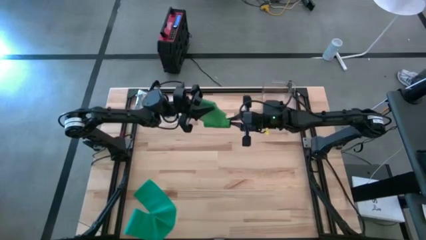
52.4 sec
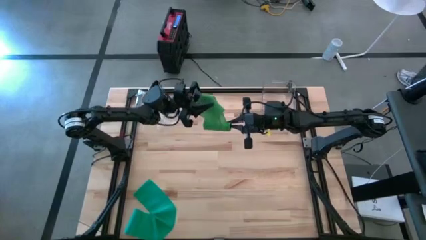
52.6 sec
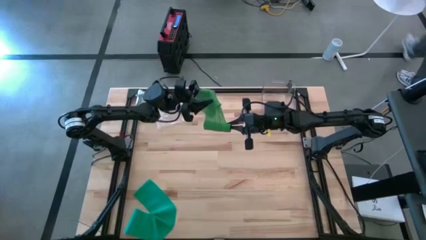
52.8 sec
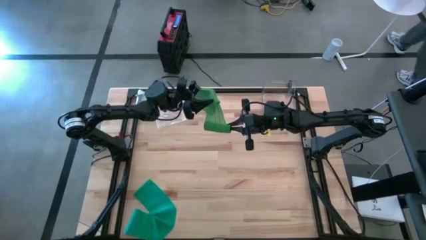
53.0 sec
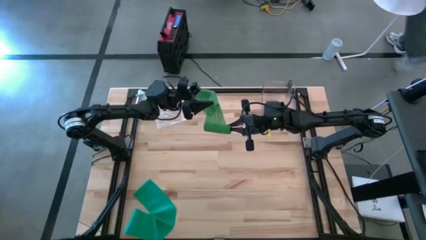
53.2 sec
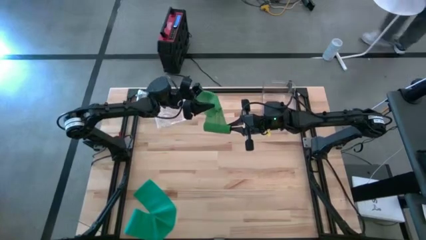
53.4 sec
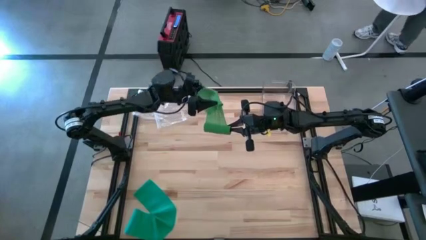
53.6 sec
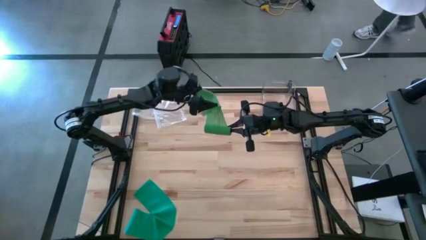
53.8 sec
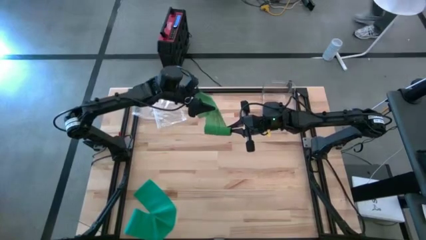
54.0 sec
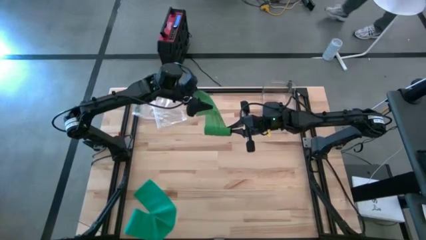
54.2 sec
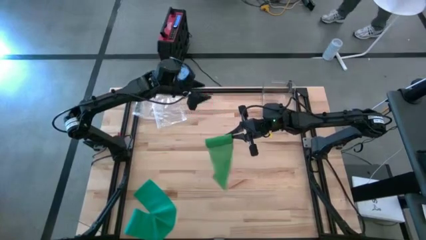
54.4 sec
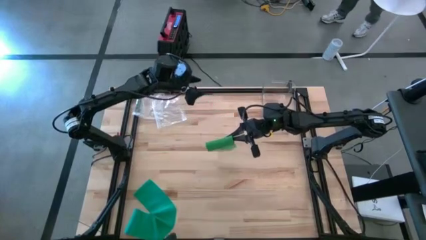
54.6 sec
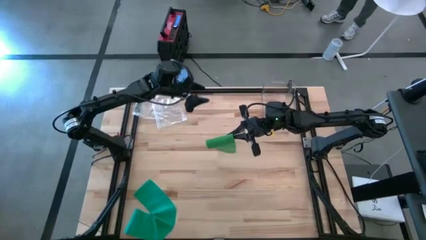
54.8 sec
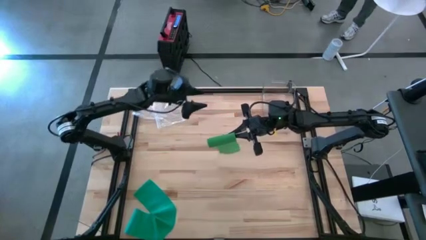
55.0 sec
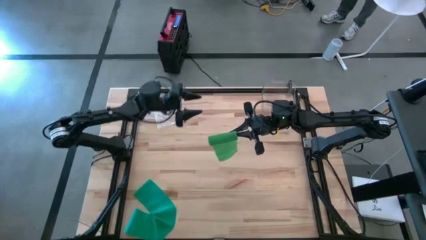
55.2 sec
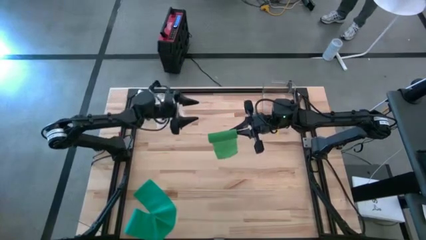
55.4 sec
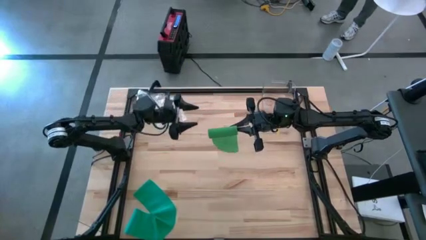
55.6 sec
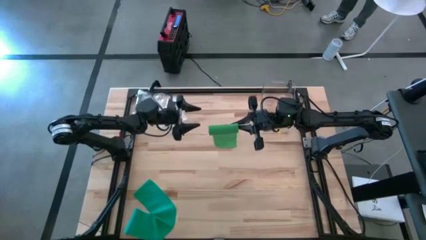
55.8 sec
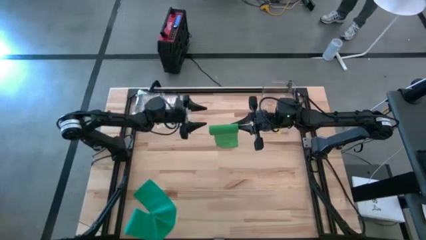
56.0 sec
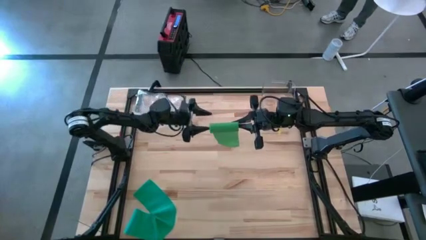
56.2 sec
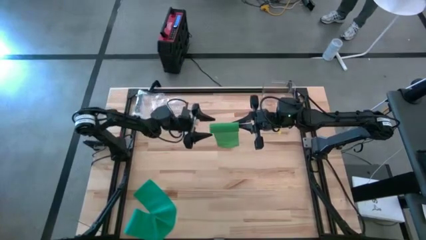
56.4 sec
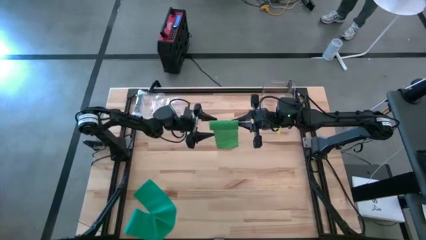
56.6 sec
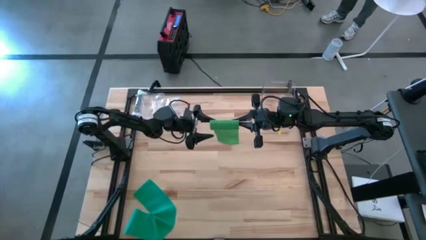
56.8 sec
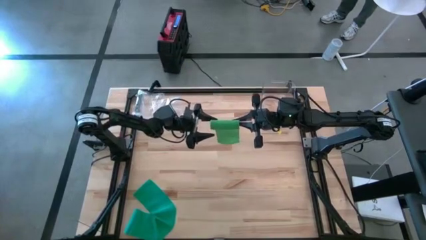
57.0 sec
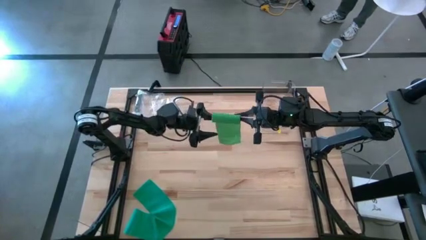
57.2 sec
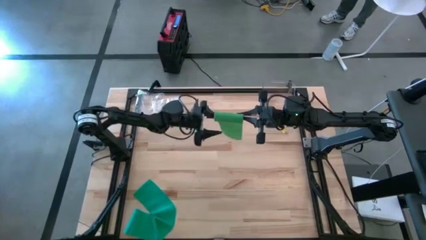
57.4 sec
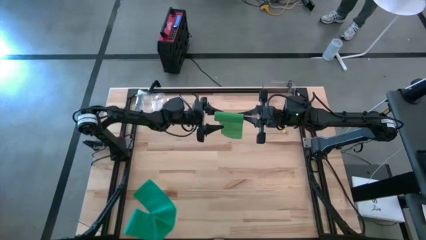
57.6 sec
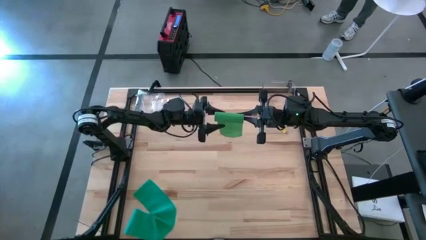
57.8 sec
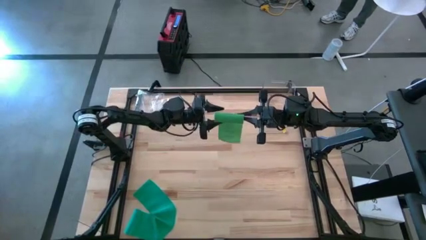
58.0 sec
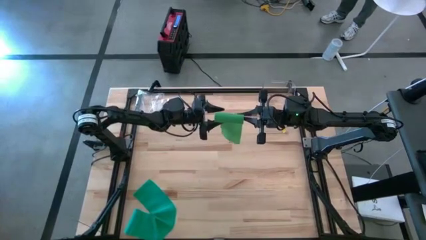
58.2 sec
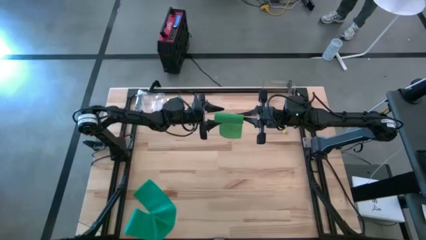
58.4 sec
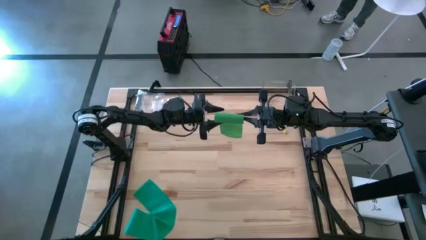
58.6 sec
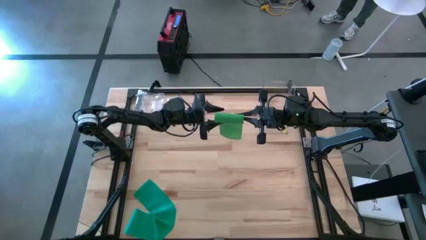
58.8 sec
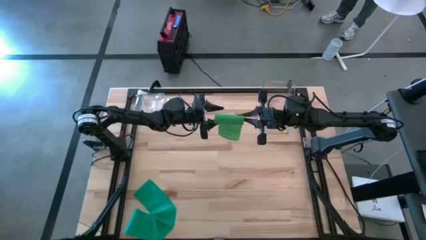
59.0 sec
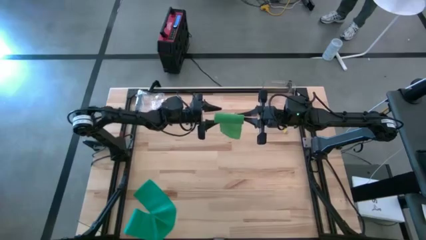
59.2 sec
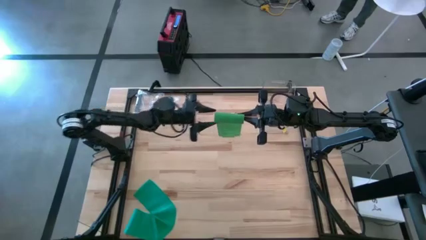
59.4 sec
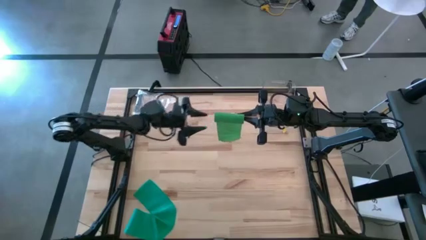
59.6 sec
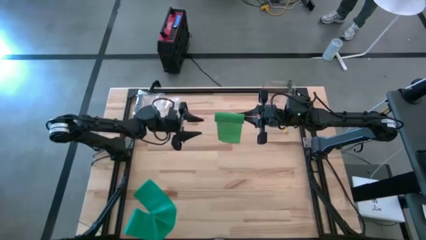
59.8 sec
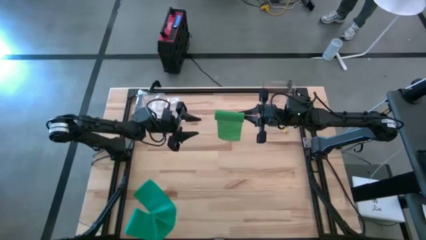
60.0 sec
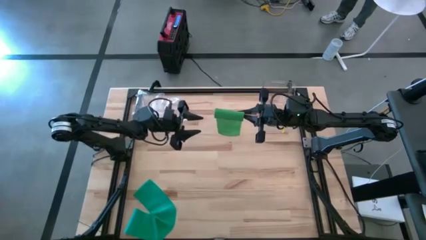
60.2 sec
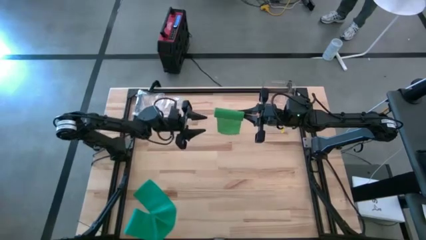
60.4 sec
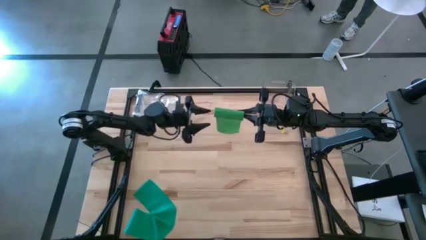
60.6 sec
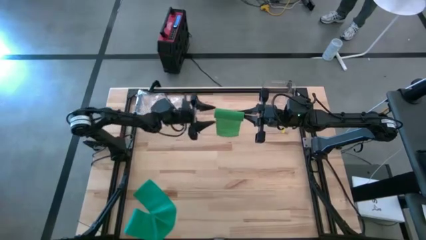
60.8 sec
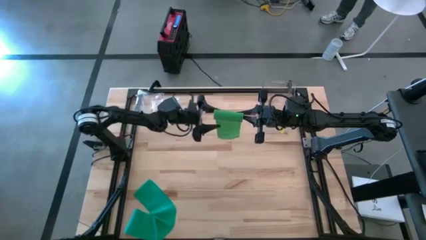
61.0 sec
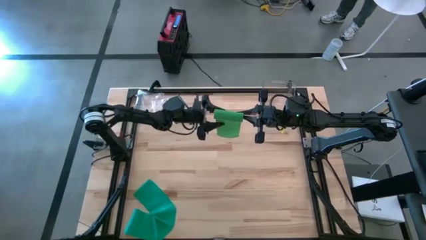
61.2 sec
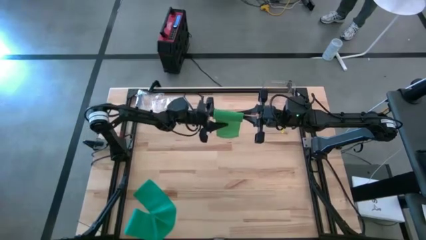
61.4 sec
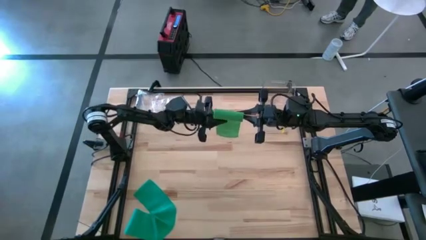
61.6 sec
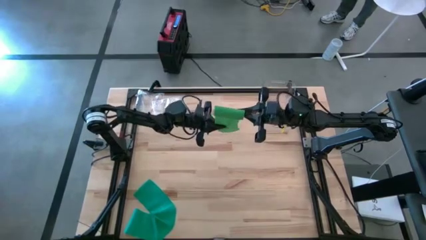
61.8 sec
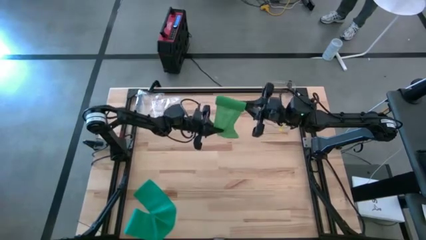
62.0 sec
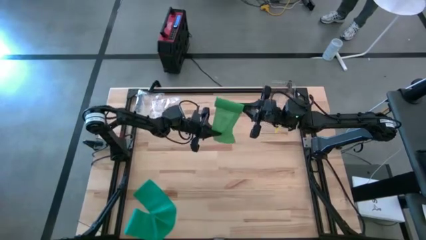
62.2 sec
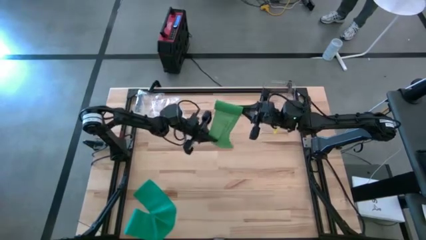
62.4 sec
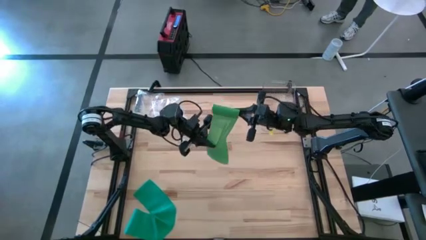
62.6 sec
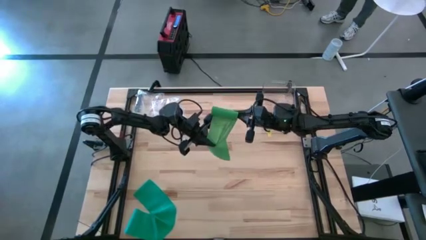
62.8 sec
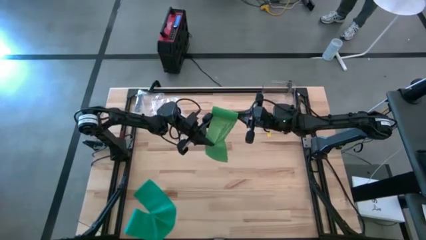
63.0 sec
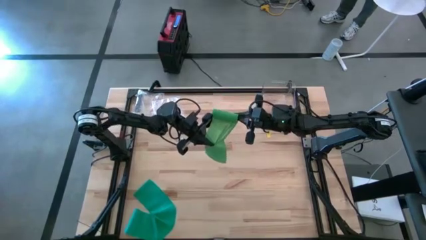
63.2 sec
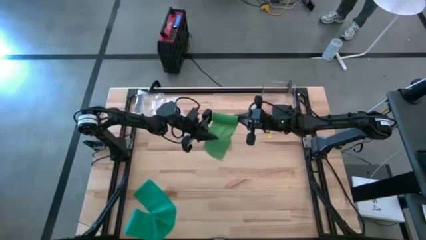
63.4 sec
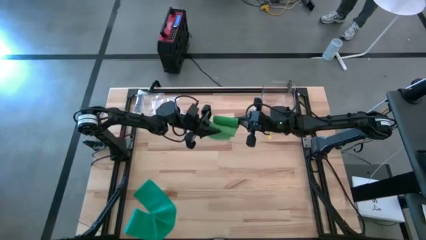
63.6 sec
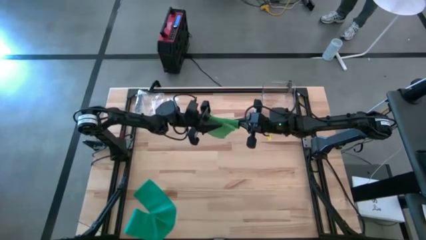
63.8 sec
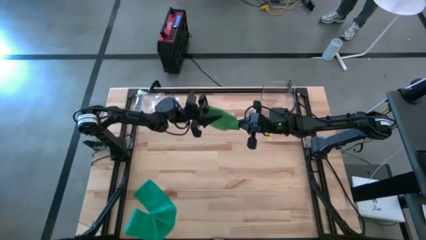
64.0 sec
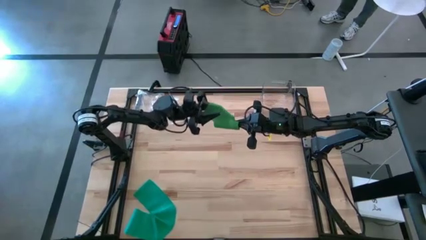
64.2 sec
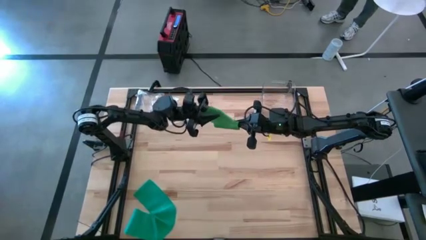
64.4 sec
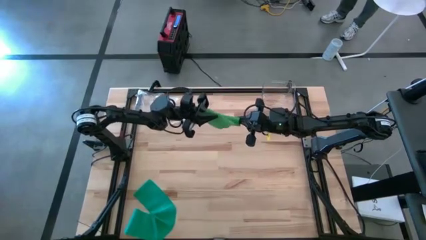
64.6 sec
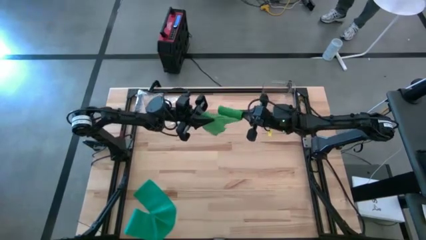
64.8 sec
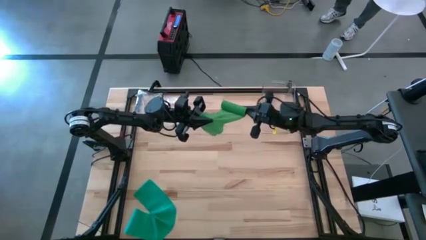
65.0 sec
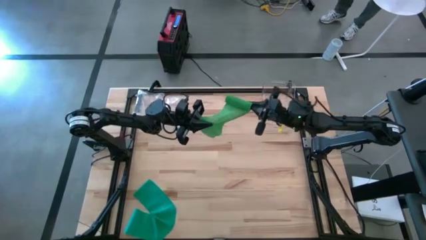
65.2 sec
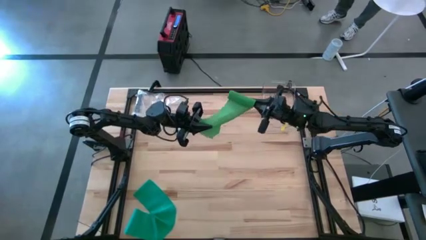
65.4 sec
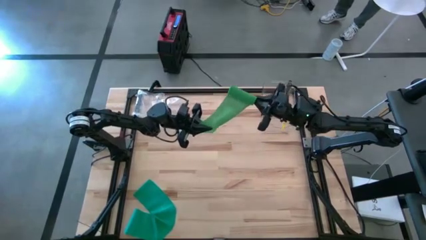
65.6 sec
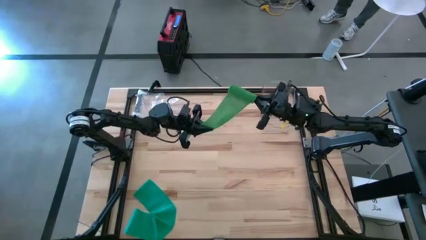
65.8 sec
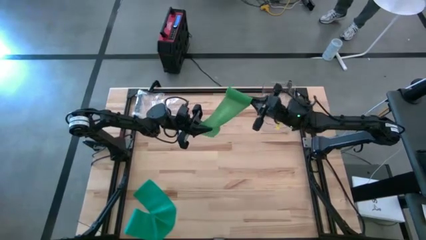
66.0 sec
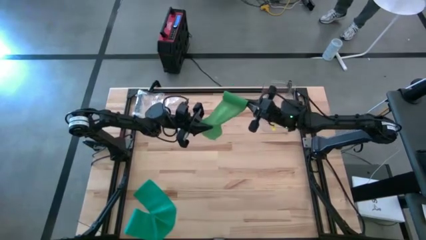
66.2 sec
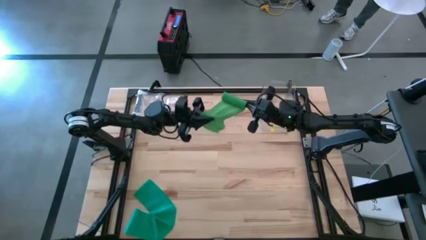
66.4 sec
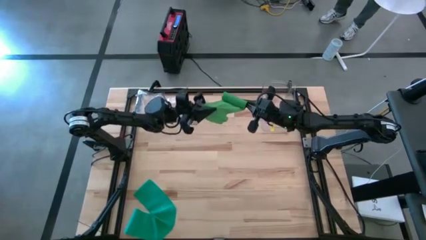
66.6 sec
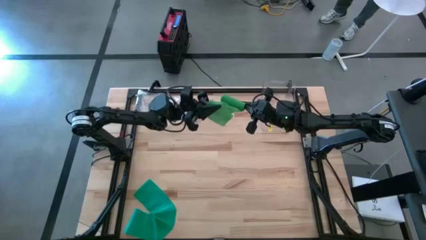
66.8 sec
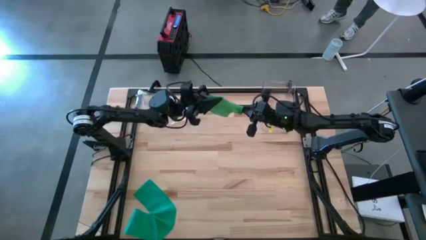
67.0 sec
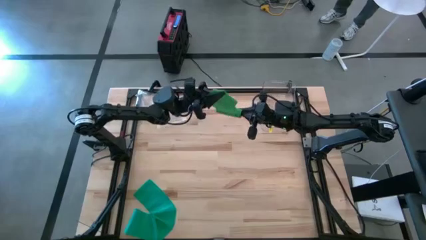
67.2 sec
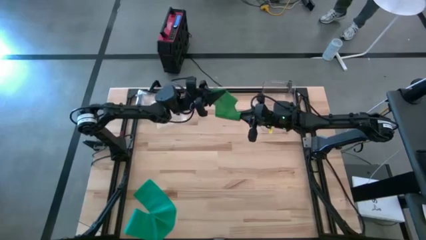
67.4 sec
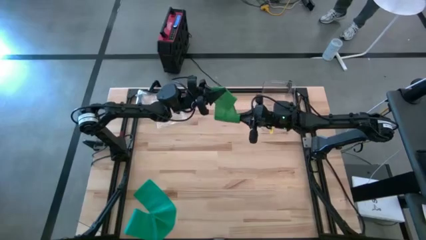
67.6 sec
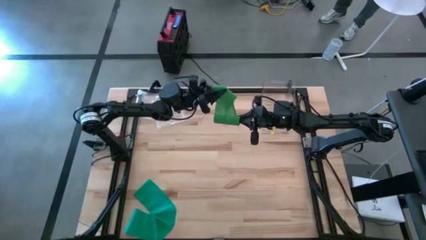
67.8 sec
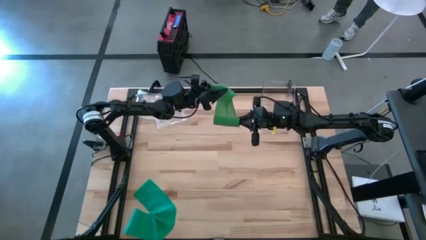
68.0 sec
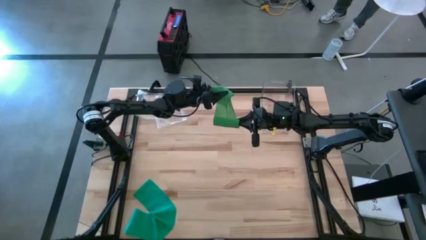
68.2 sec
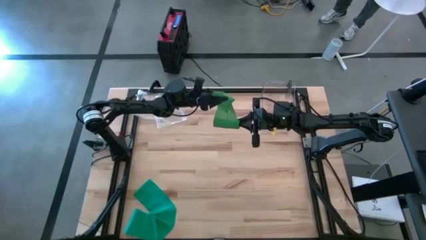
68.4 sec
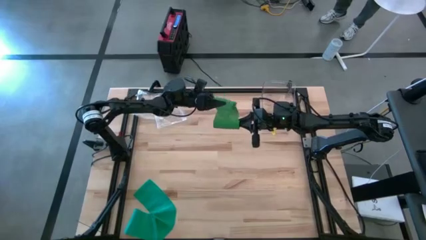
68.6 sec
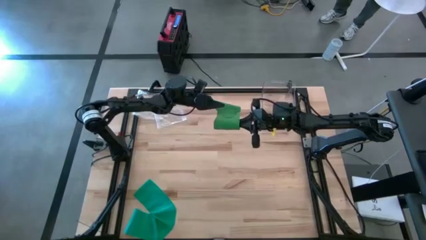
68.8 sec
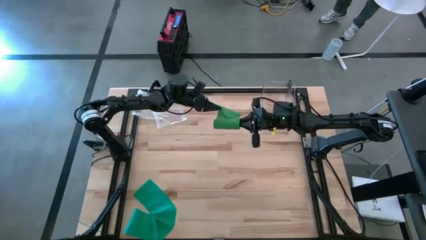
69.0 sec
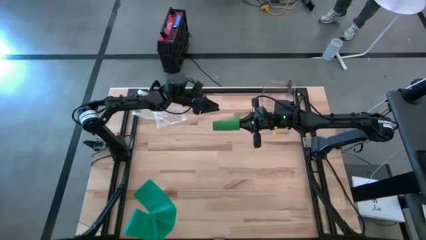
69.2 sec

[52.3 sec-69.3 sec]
Task: Roll bandage
Roll the green bandage
